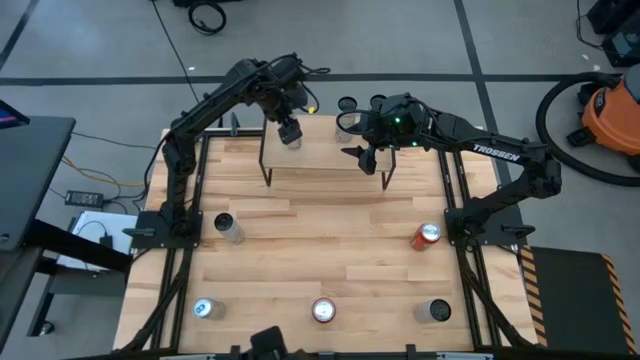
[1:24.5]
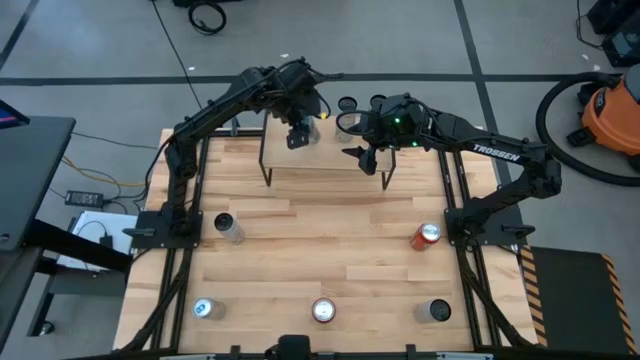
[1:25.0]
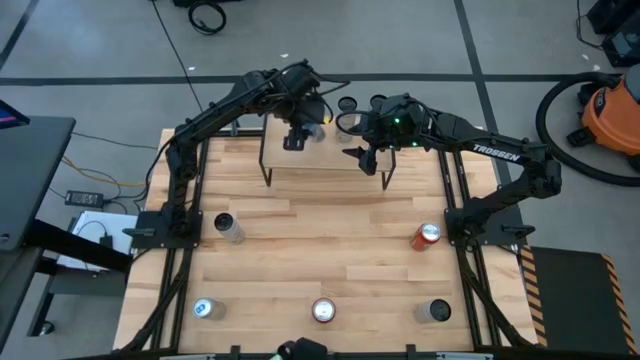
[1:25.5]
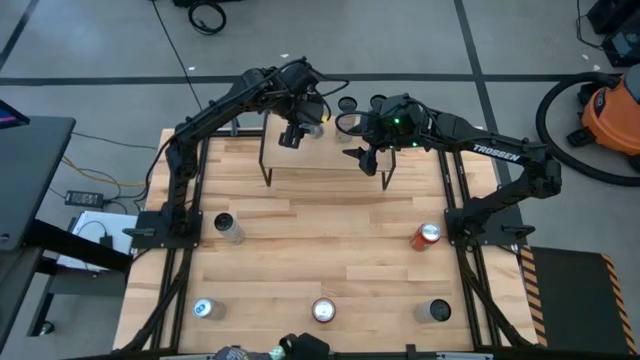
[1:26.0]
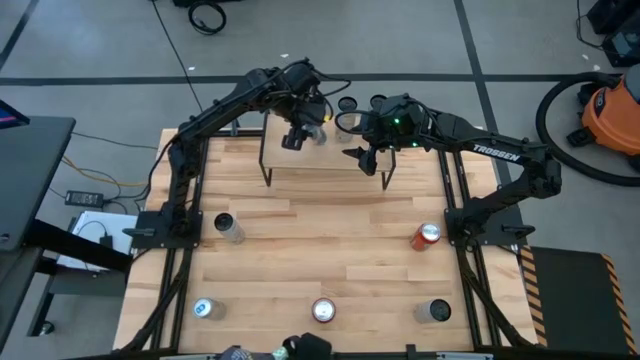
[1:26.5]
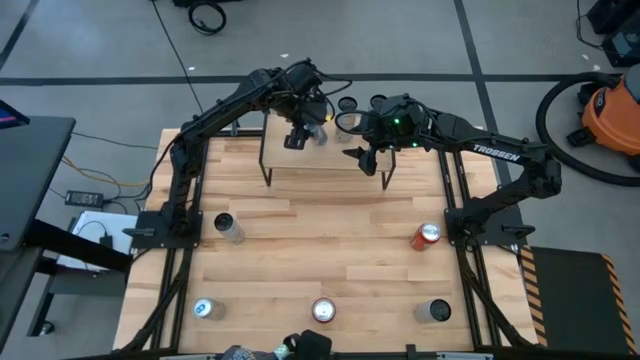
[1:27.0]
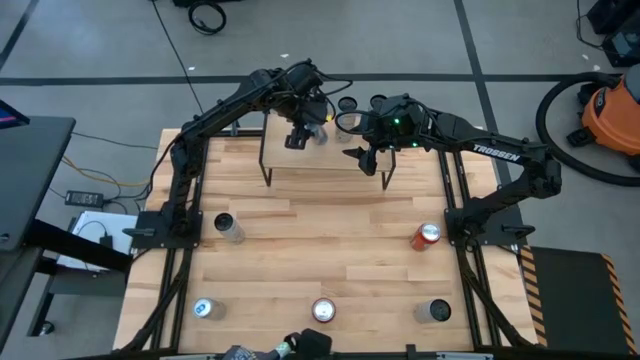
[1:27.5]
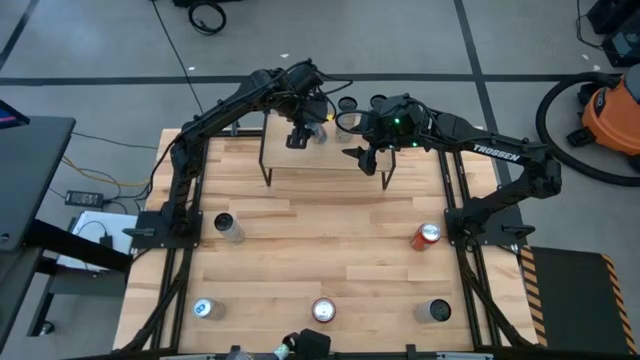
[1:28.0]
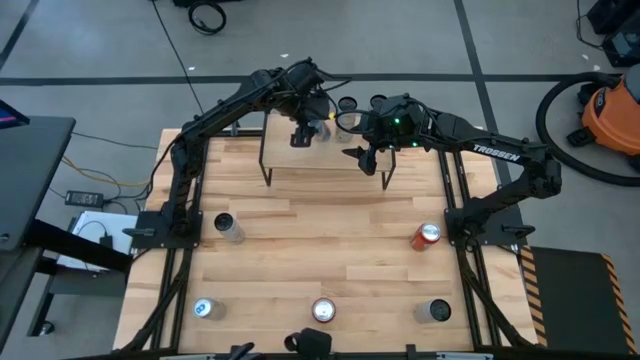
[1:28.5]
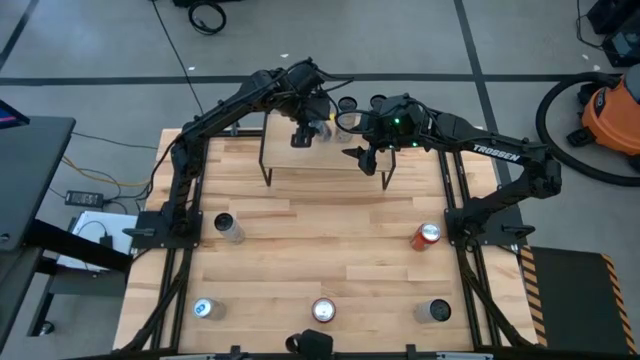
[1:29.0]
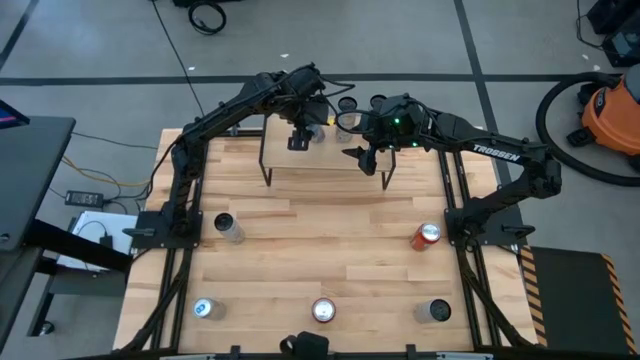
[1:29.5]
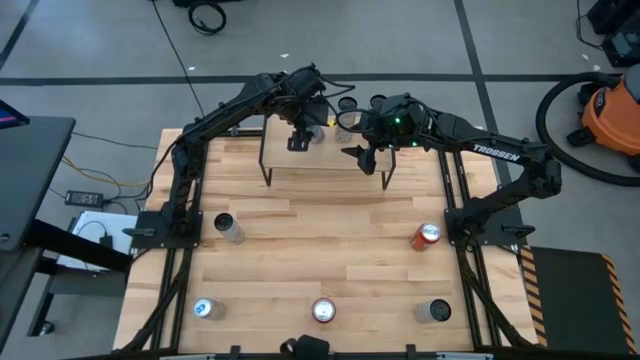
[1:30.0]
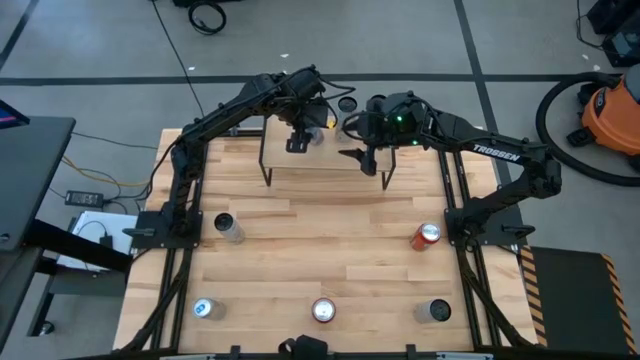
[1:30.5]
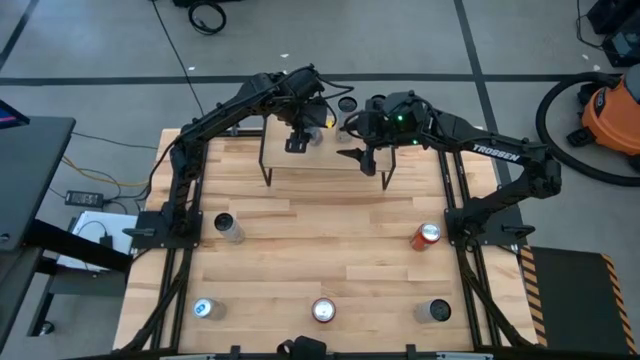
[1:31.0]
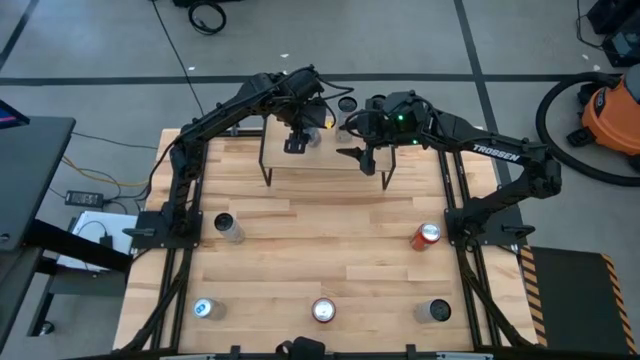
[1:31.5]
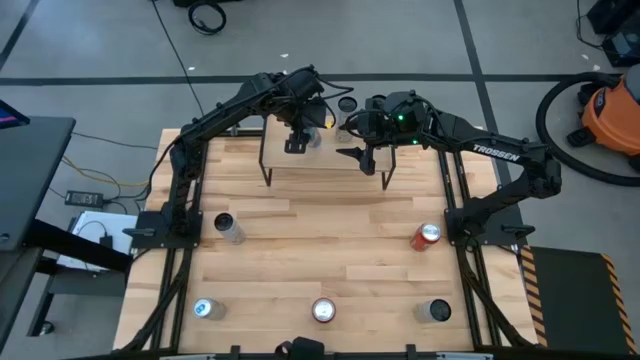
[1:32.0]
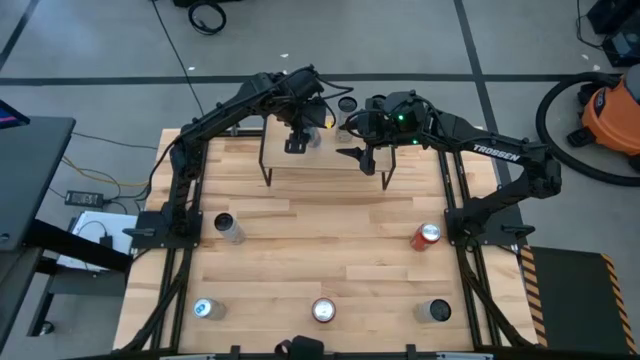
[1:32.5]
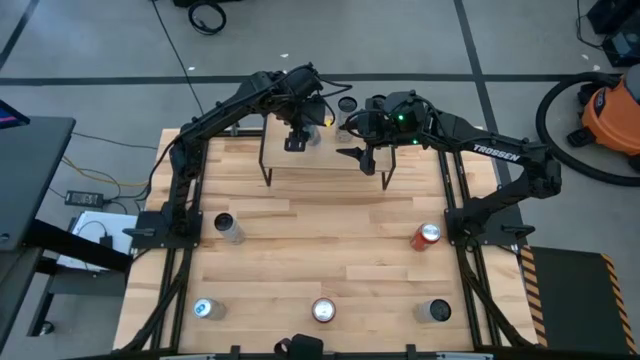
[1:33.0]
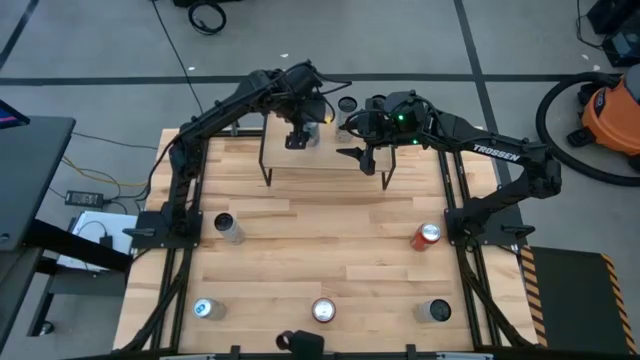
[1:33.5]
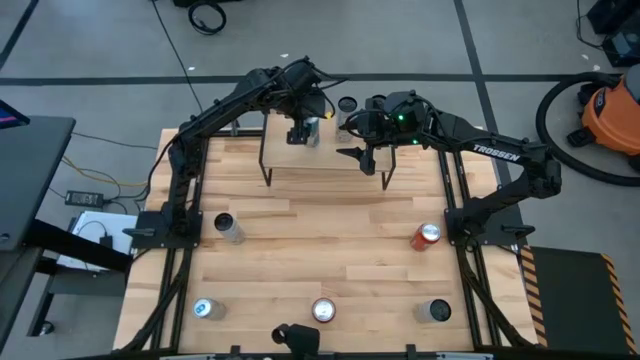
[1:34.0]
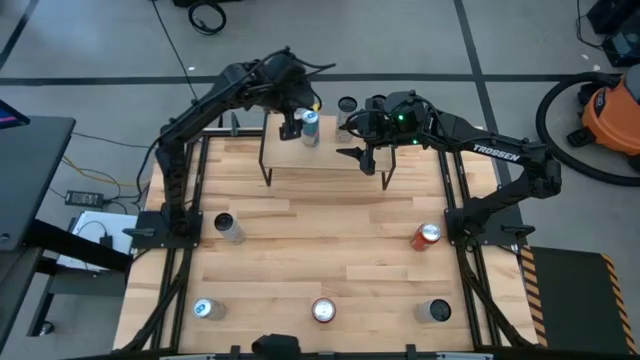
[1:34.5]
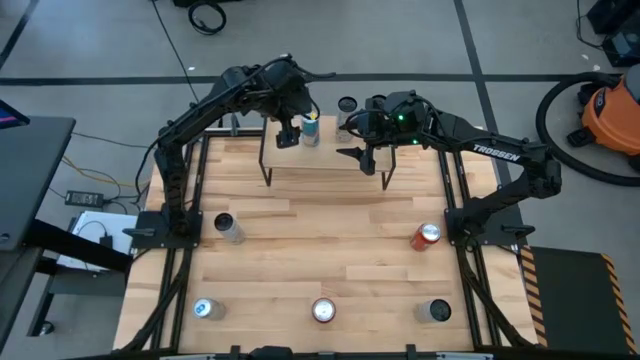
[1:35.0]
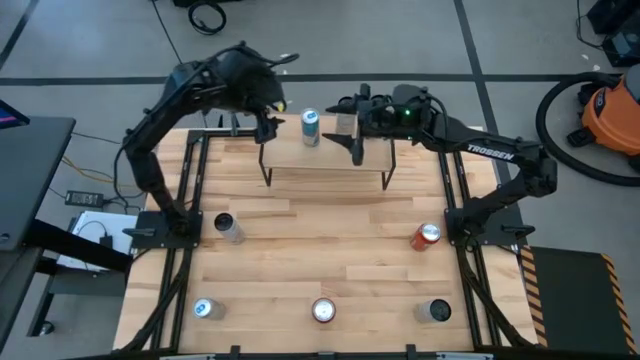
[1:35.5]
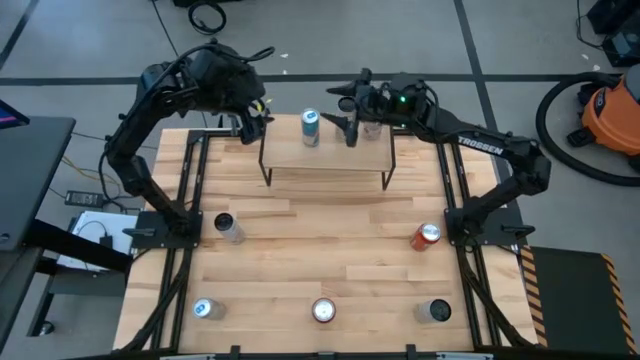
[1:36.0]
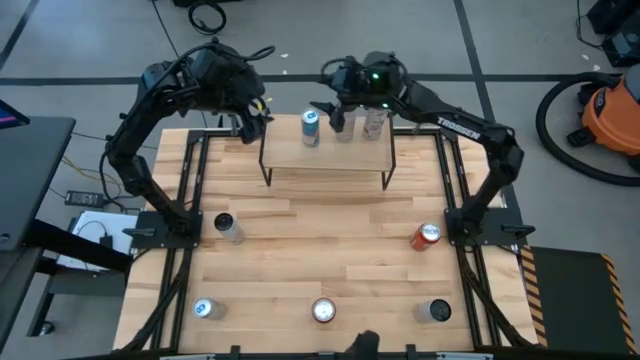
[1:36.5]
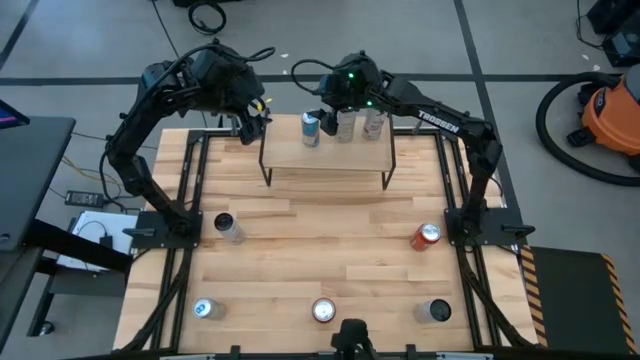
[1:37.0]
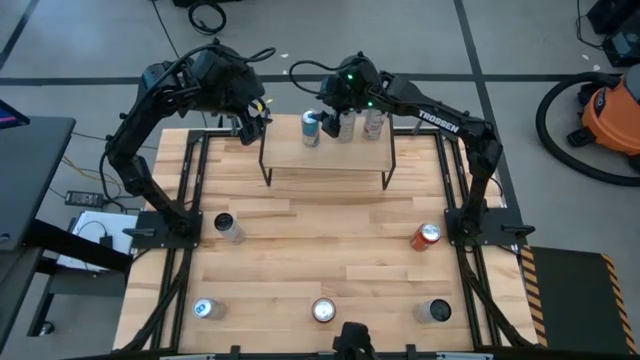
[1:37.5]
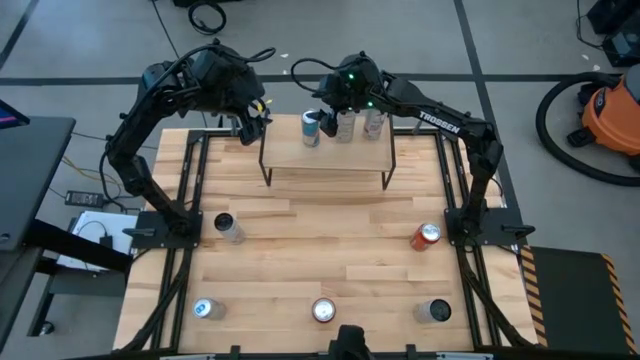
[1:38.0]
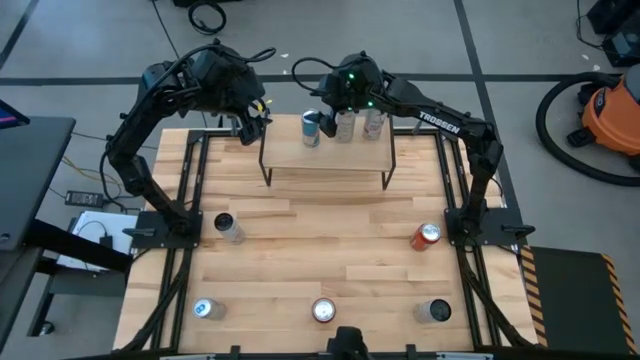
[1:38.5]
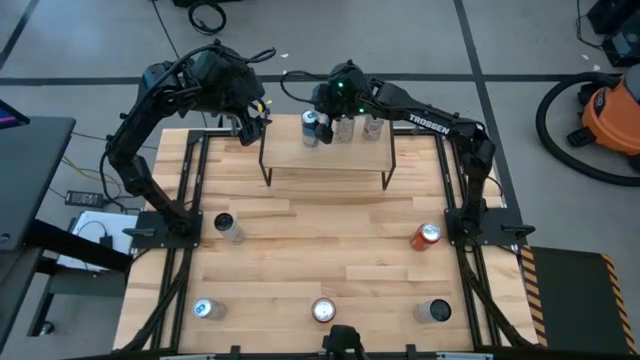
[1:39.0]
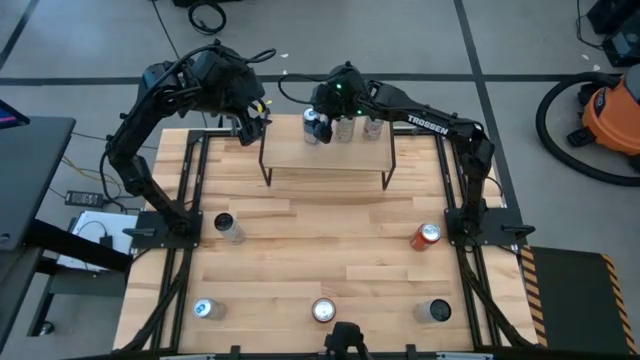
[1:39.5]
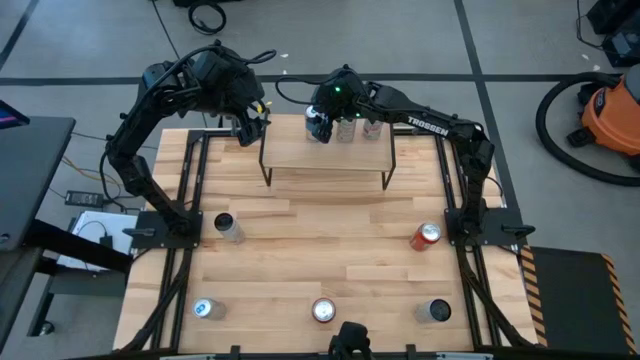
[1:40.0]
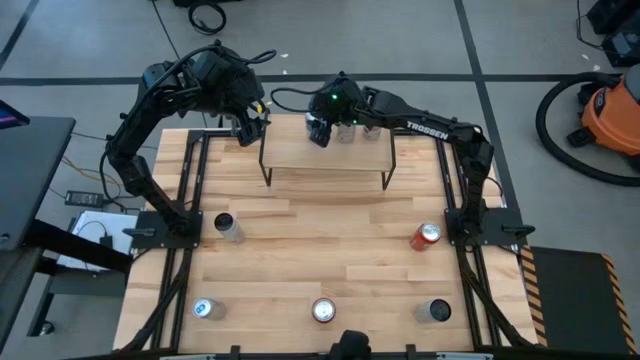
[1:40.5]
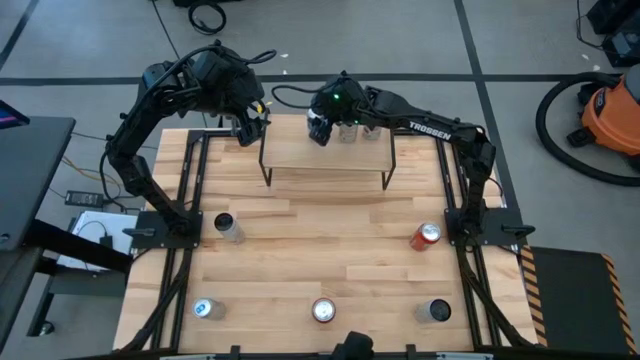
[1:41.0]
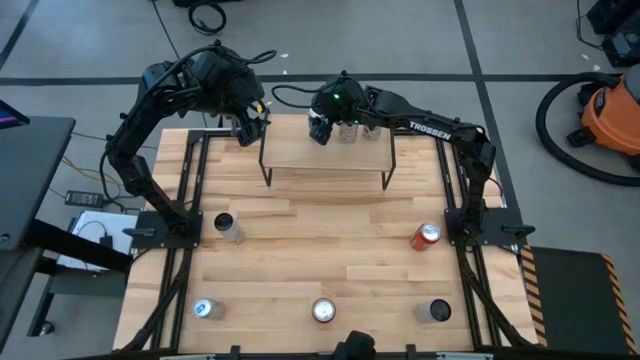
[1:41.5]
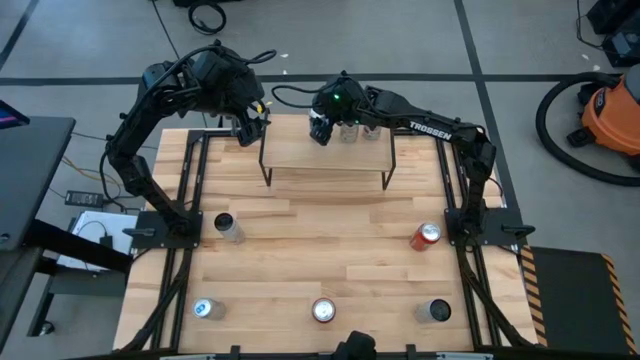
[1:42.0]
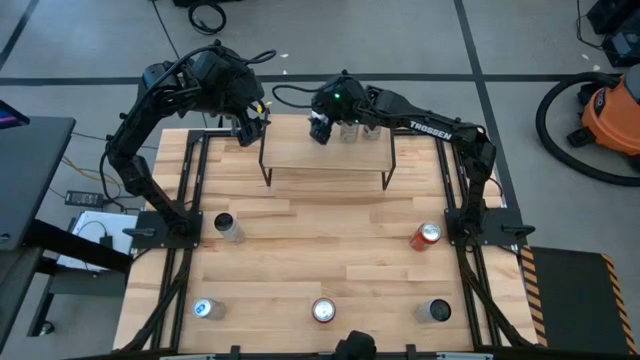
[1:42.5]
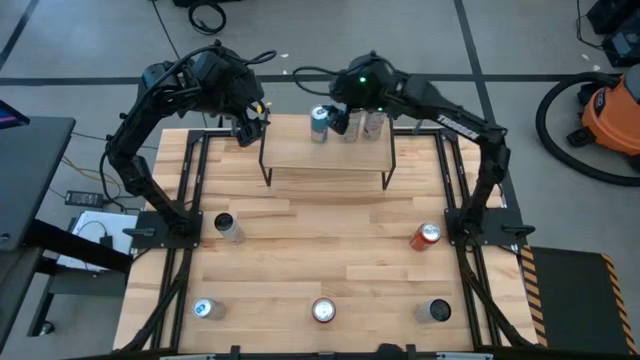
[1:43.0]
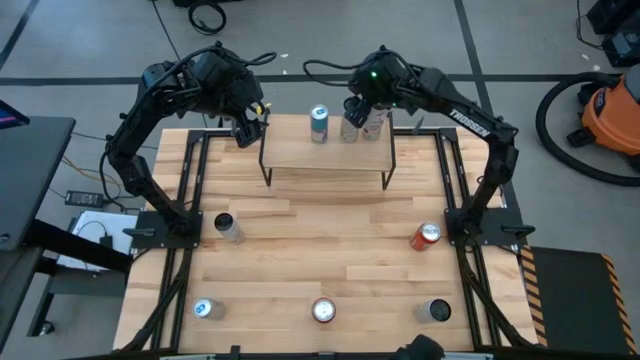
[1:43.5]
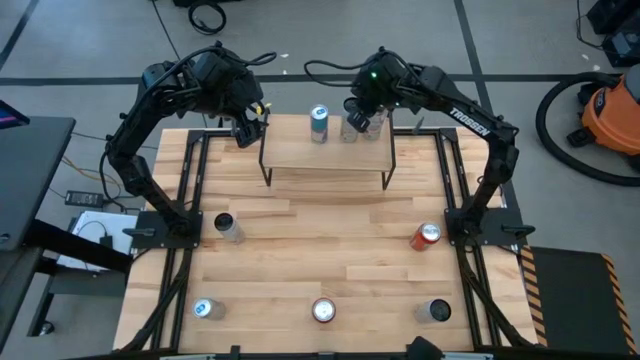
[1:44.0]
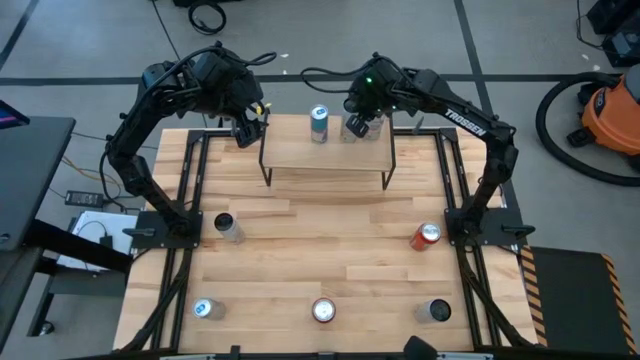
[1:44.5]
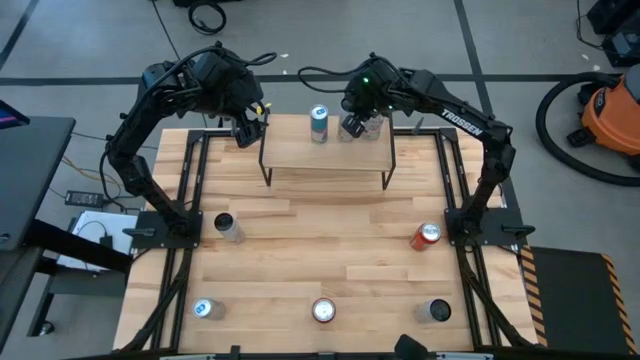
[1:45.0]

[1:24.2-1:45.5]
Task: Place canned beverage on shelf
Put the top blue soda can on the shelf
